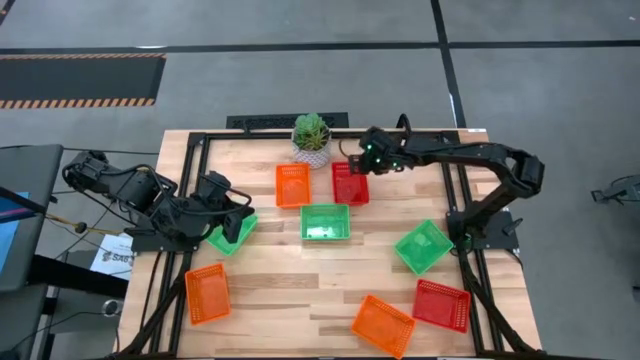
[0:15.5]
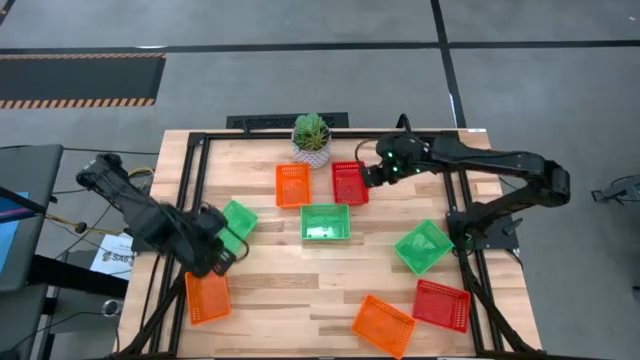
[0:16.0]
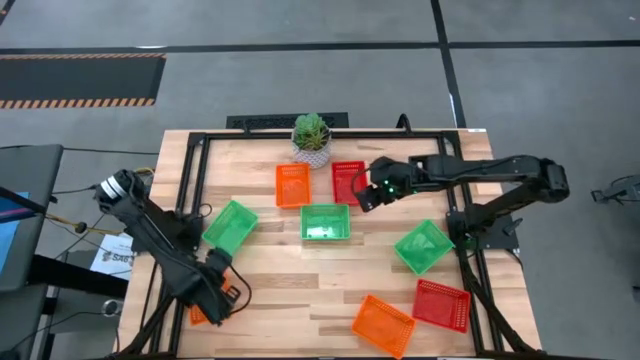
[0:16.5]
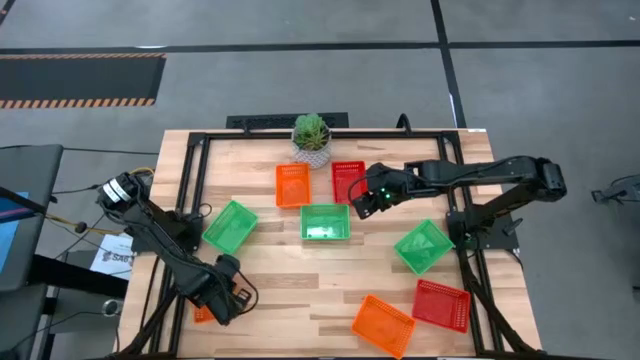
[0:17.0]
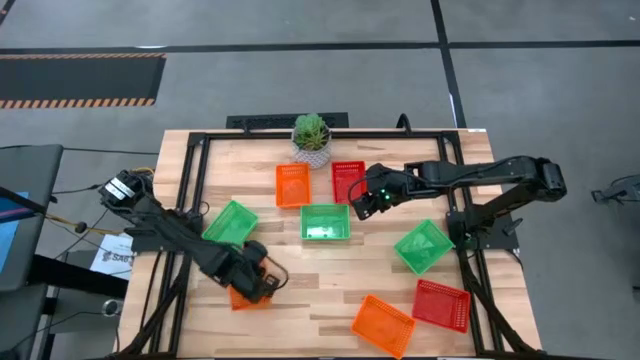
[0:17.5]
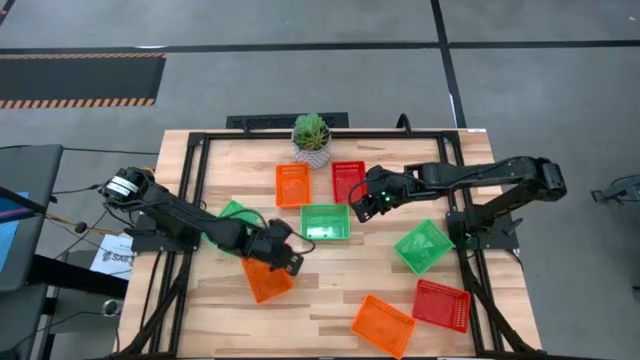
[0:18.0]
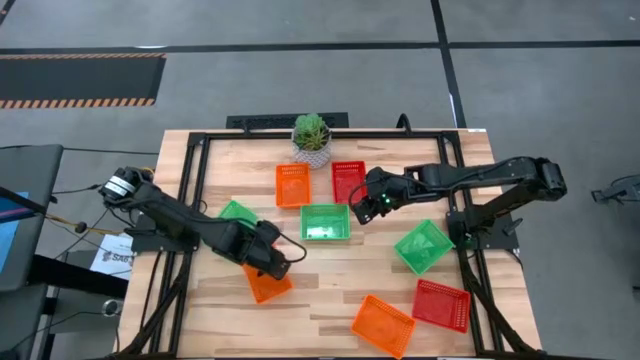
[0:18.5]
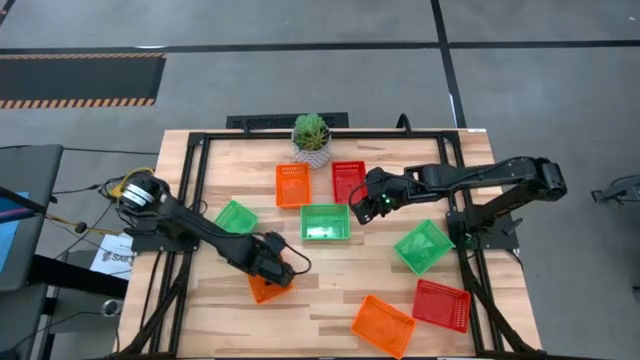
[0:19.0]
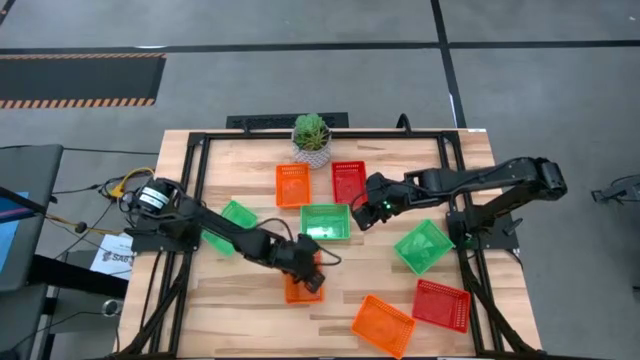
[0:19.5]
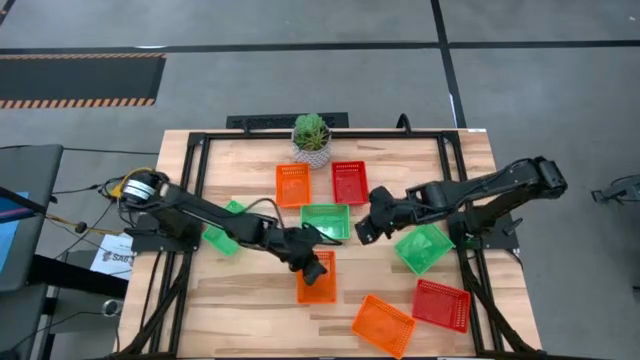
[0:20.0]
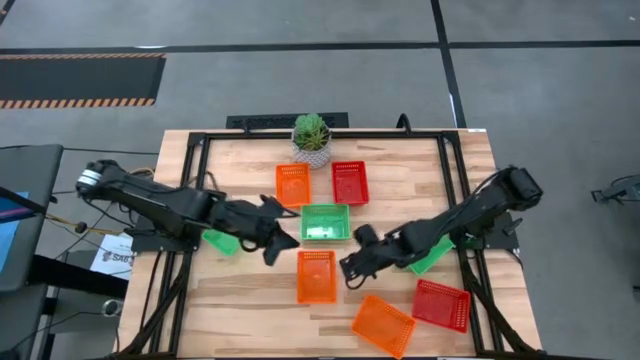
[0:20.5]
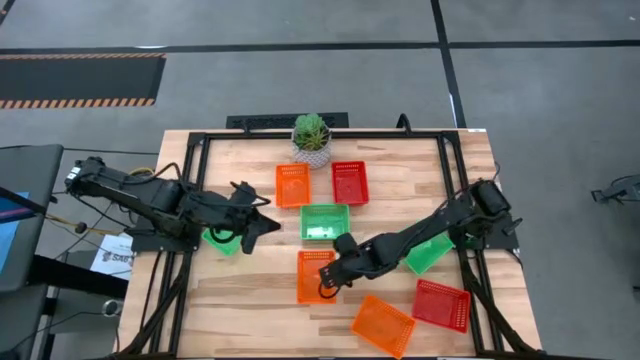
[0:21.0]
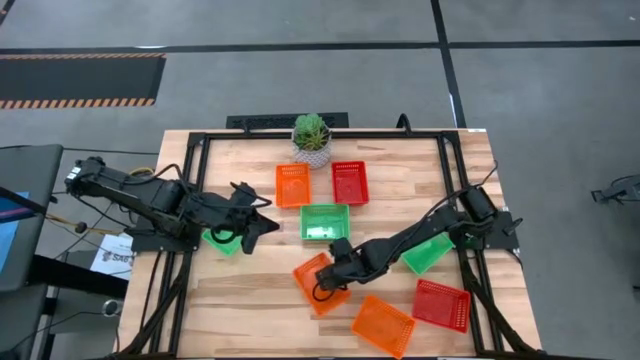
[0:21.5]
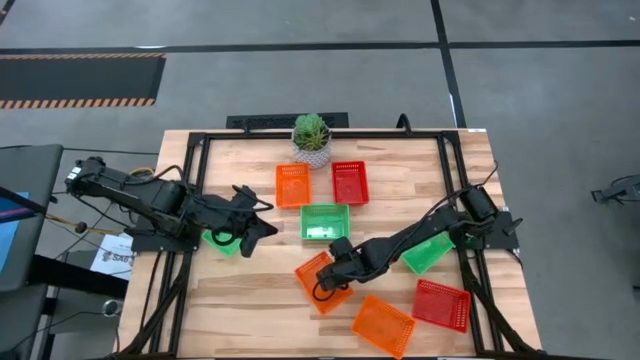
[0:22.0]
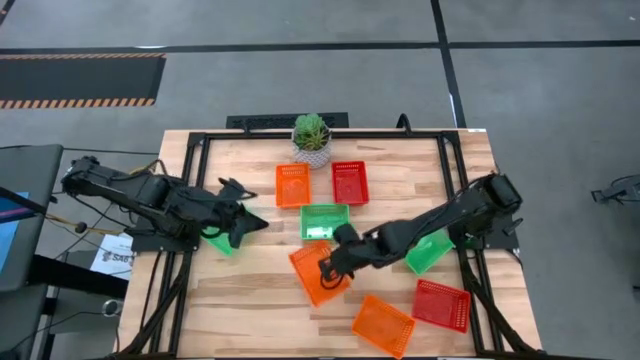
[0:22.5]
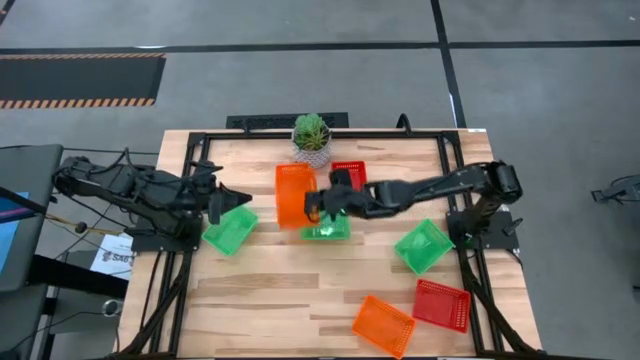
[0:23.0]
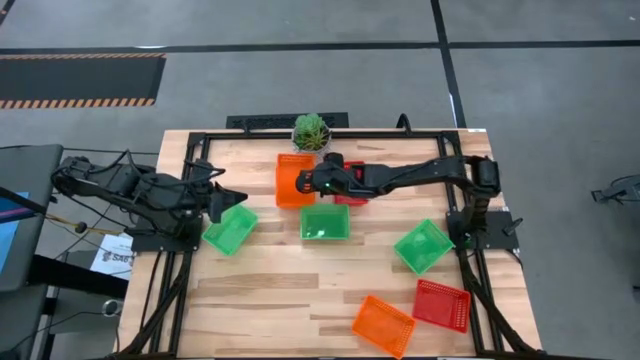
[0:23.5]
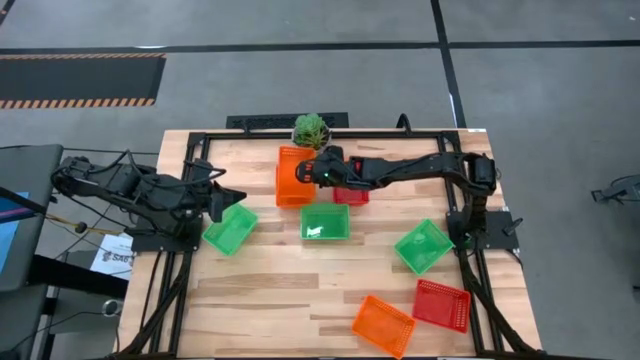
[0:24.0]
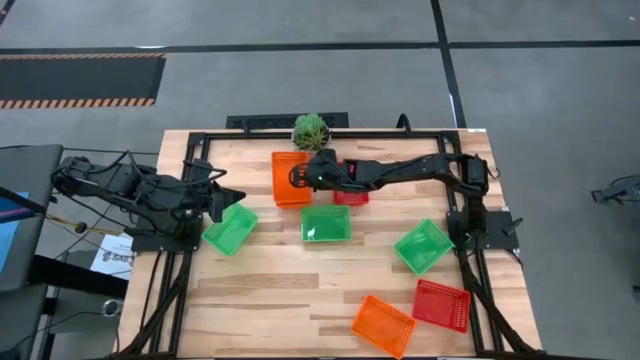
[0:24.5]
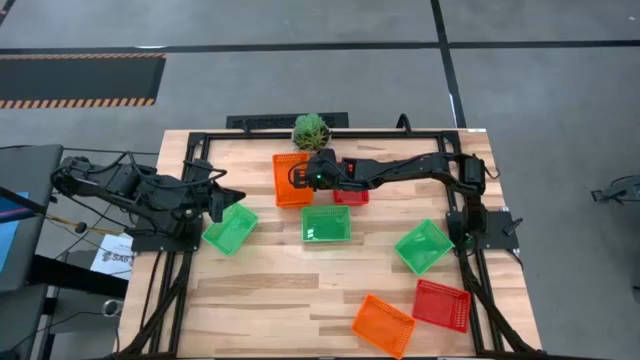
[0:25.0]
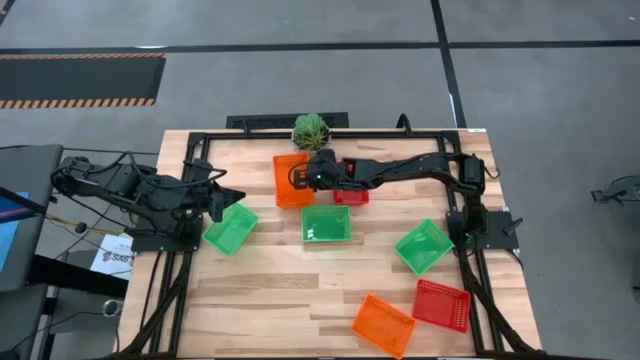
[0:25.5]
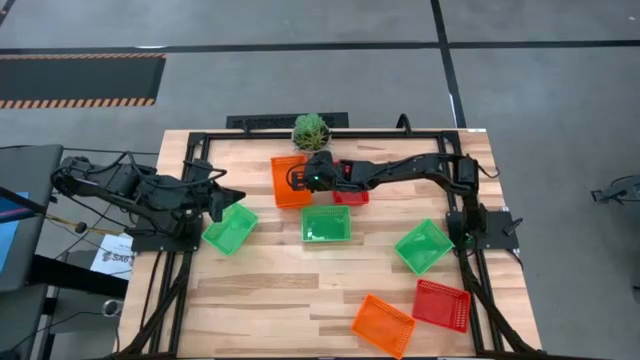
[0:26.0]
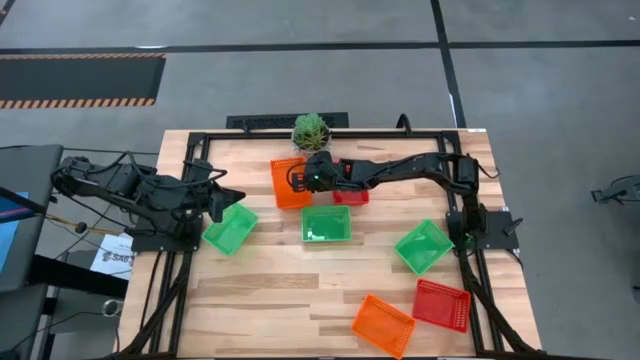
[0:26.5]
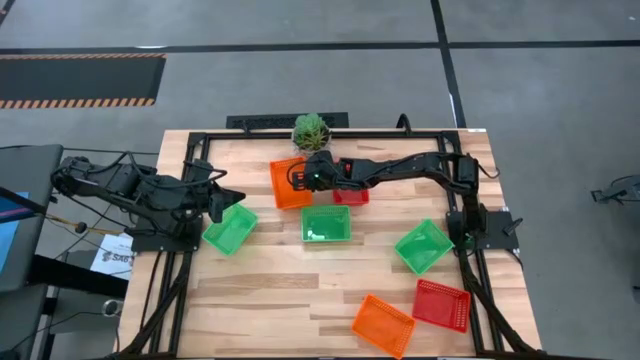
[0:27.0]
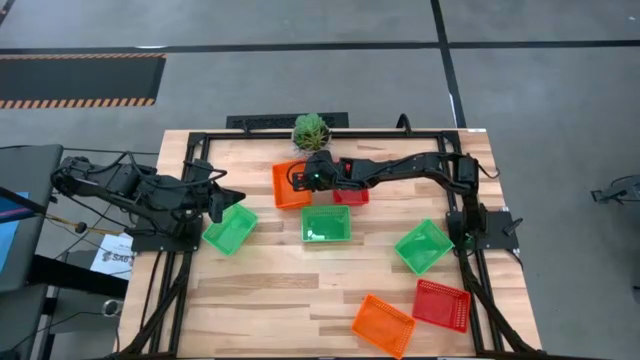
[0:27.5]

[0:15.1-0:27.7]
Stack the bottom left orange bin on the top orange bin

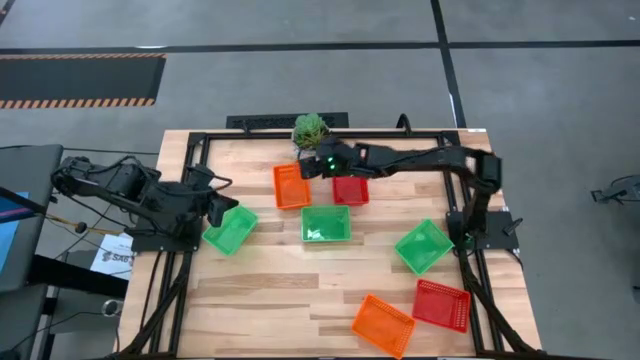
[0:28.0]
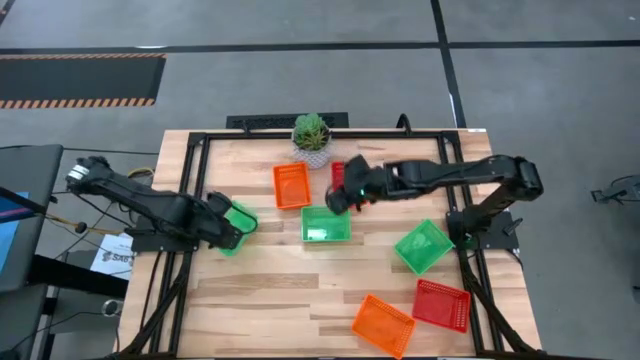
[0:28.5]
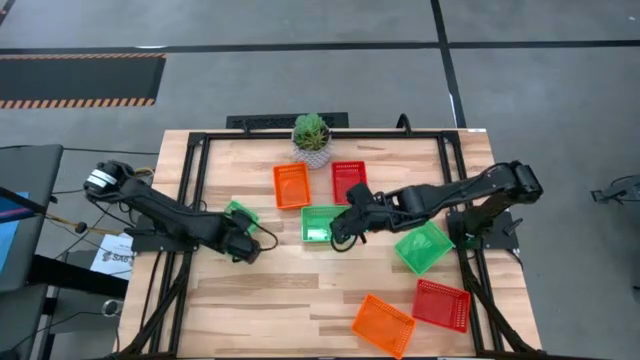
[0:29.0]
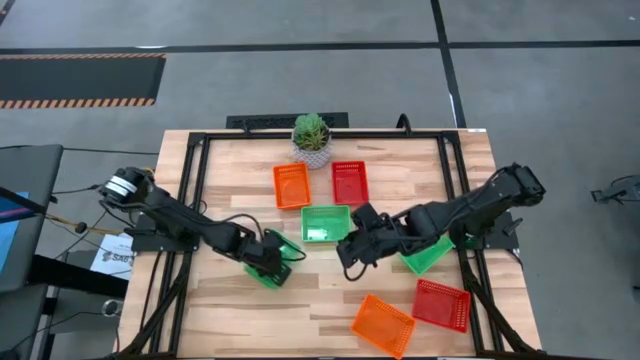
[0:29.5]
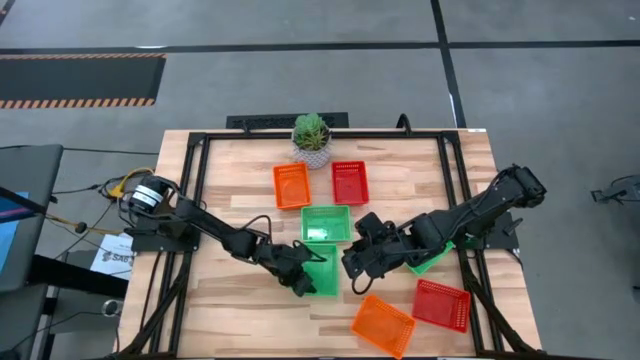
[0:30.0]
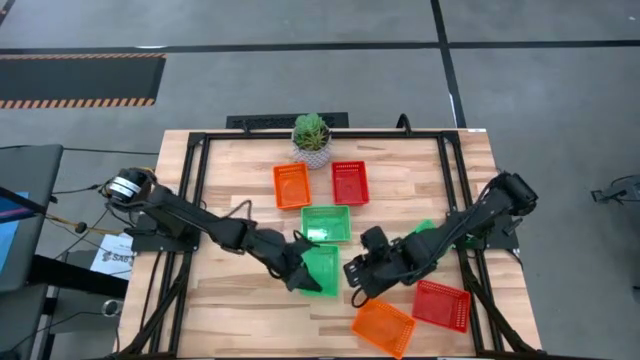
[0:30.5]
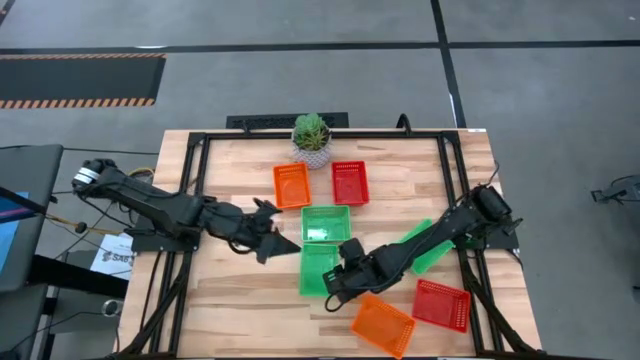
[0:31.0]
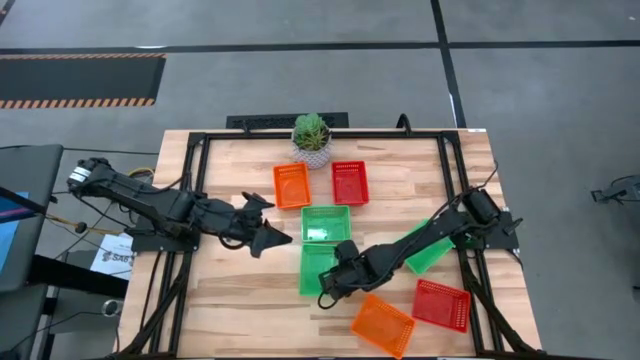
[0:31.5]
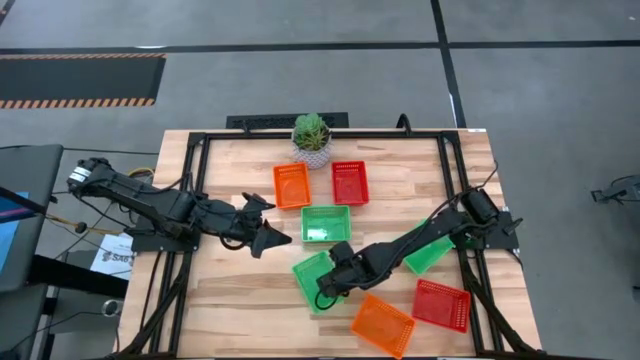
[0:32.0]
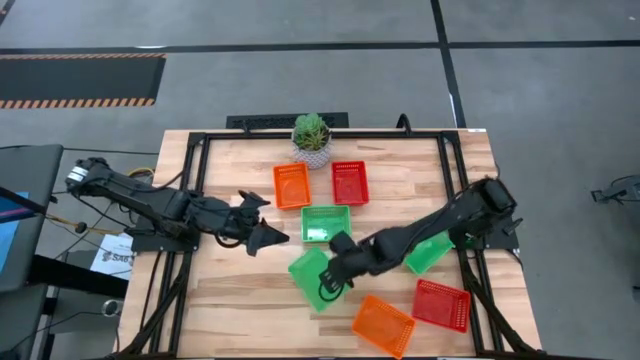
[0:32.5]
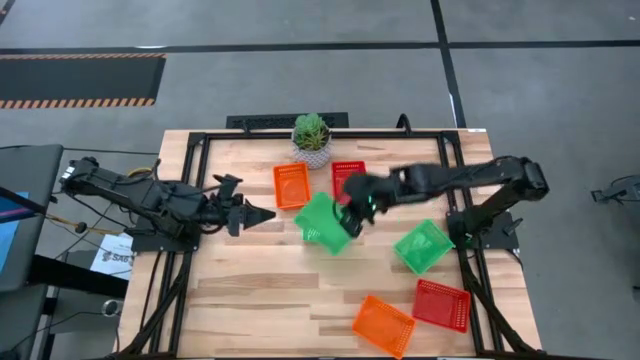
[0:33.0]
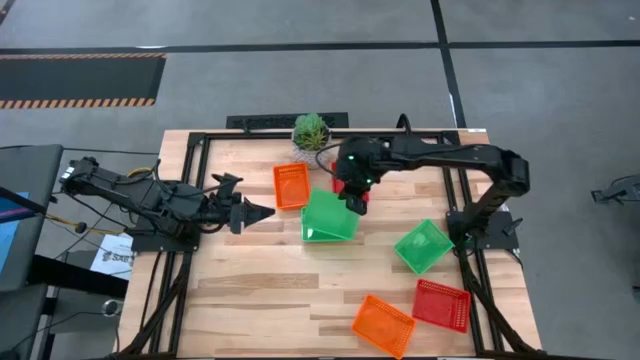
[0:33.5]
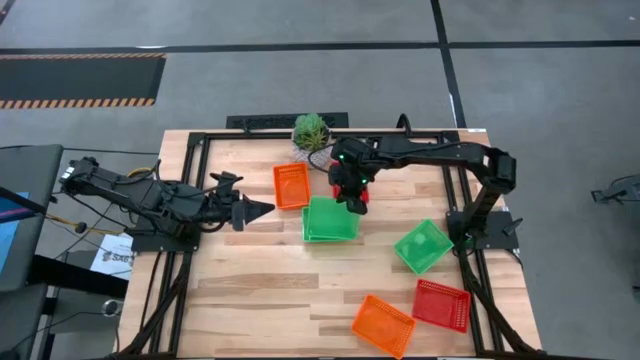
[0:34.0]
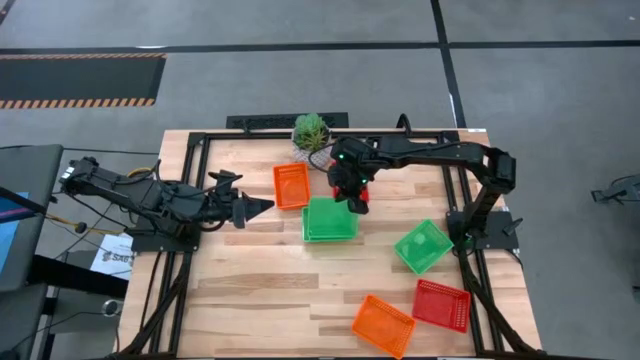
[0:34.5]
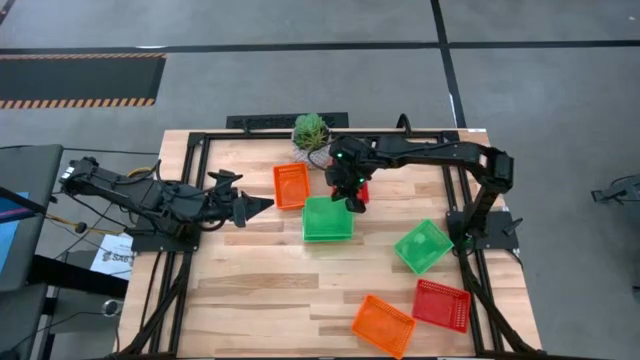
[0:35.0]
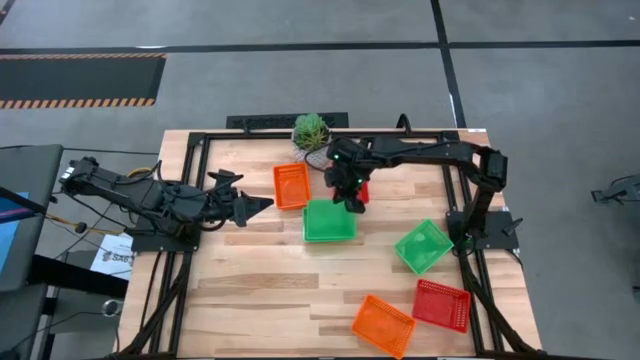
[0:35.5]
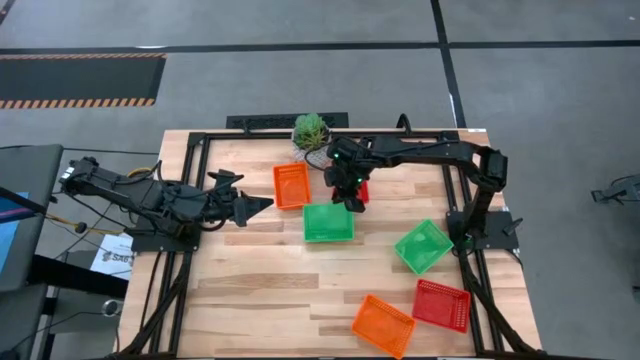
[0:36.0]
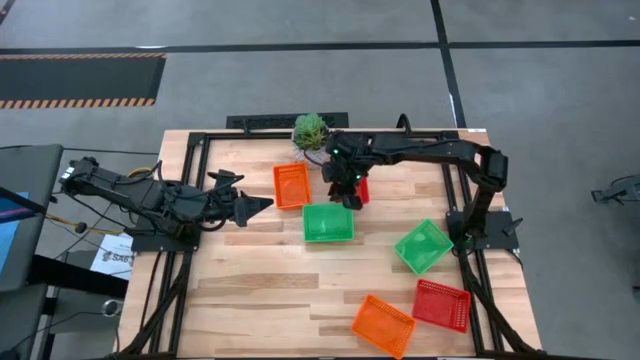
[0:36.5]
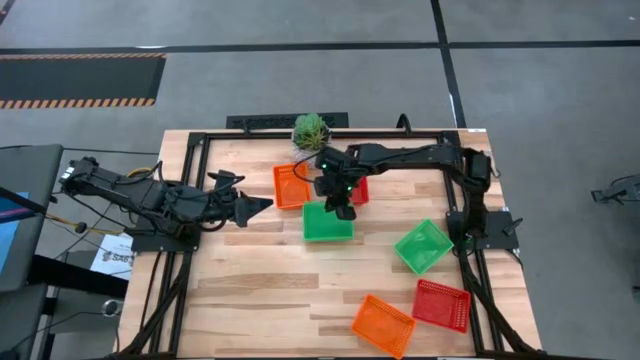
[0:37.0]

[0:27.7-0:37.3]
Stack the left green bin on the middle green bin
